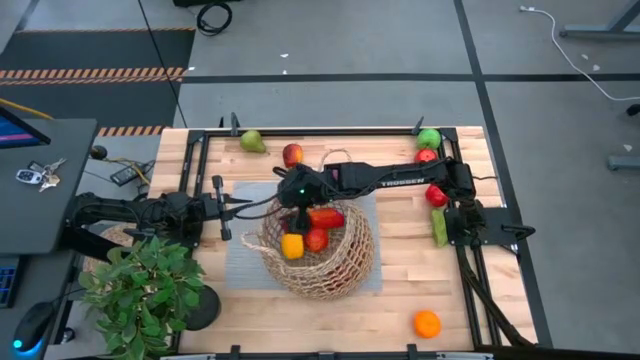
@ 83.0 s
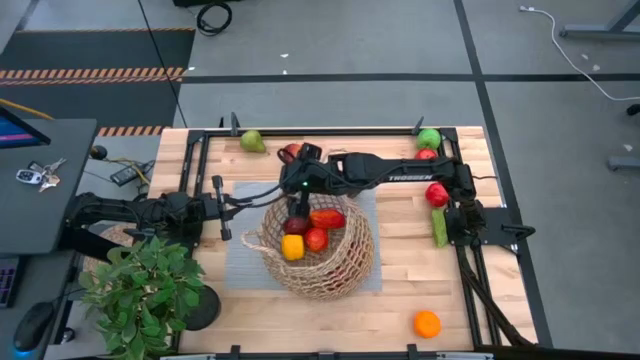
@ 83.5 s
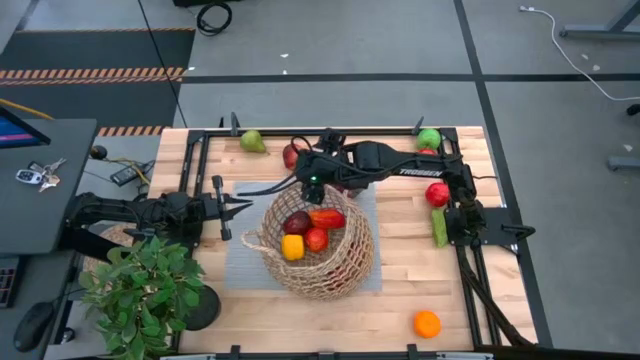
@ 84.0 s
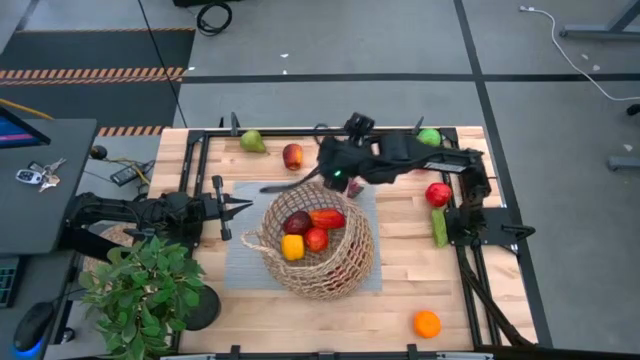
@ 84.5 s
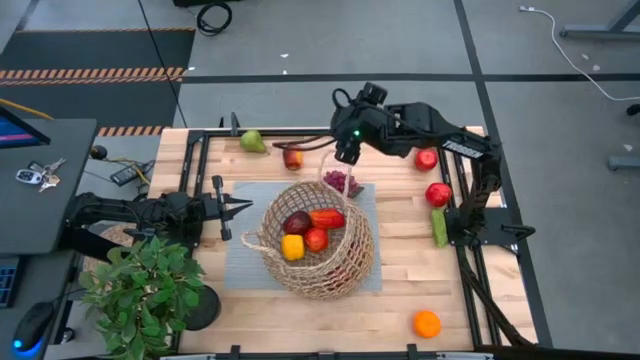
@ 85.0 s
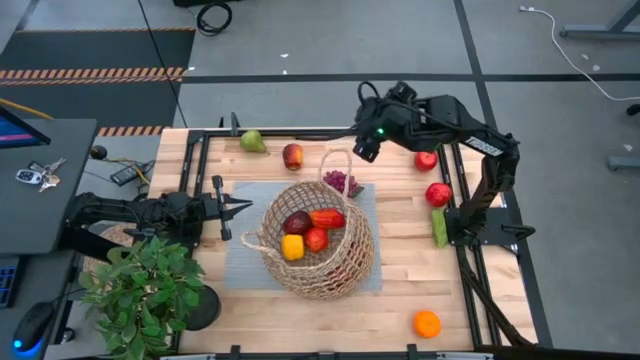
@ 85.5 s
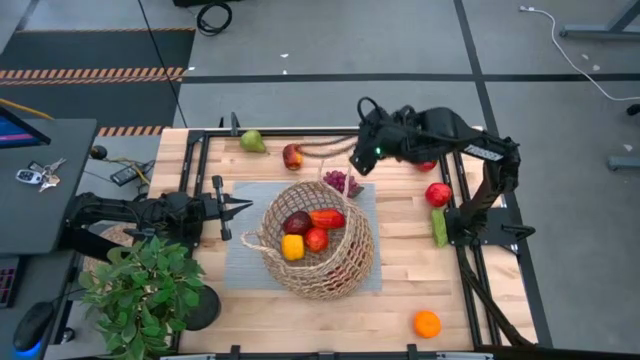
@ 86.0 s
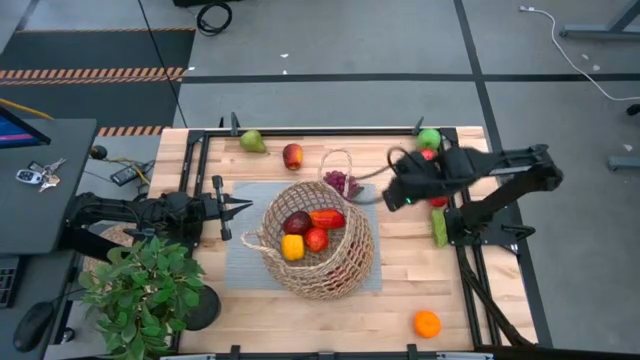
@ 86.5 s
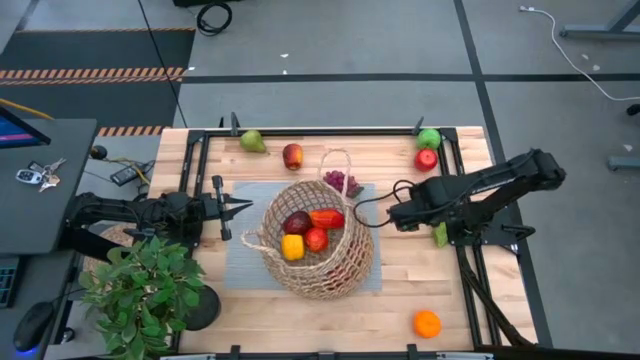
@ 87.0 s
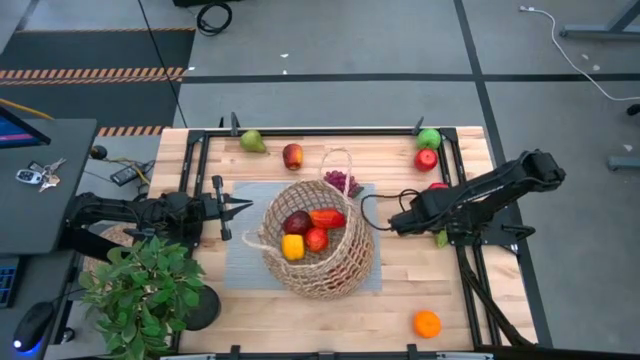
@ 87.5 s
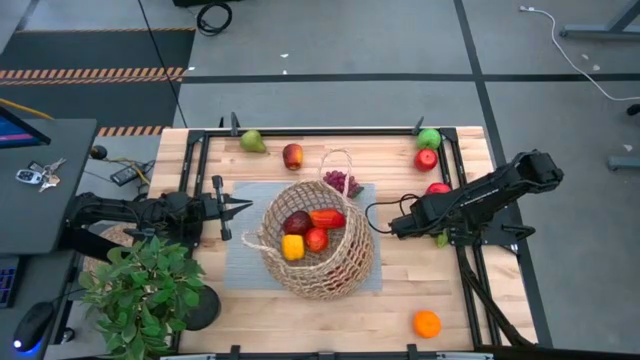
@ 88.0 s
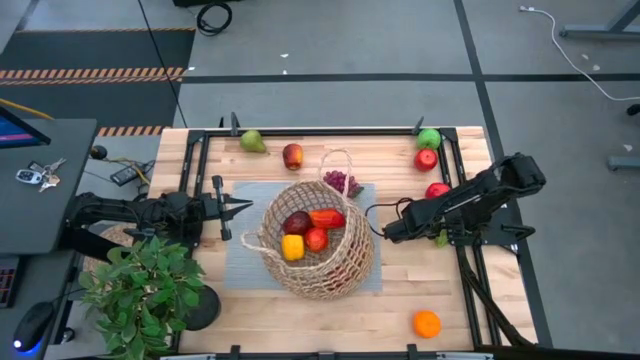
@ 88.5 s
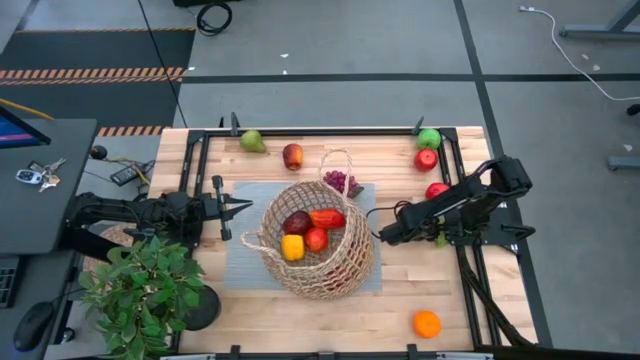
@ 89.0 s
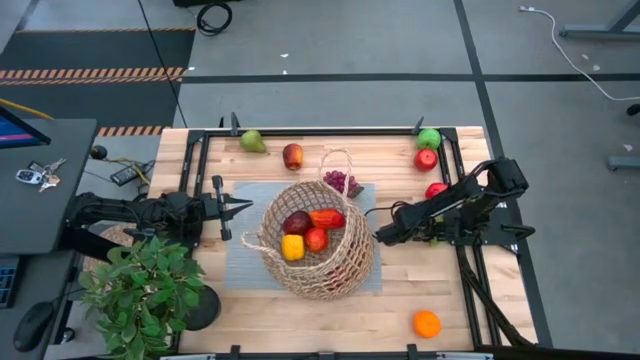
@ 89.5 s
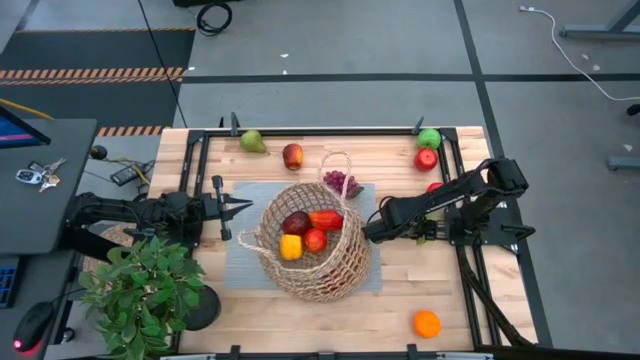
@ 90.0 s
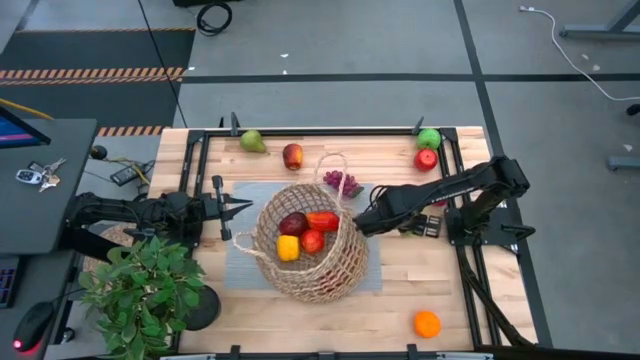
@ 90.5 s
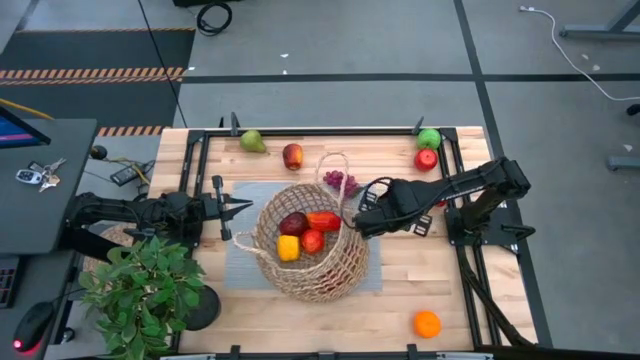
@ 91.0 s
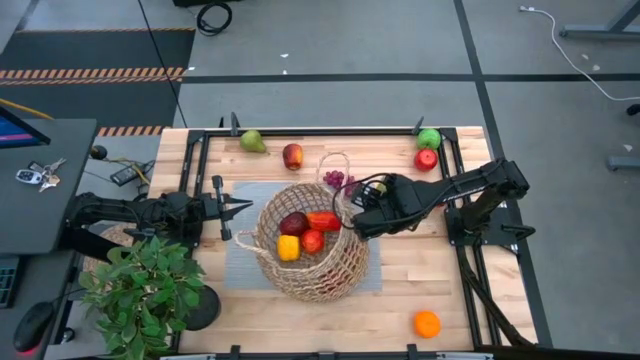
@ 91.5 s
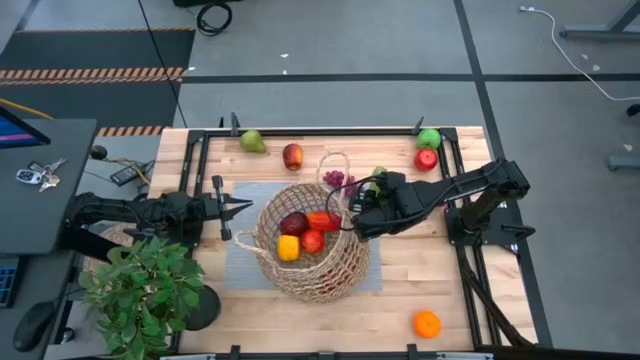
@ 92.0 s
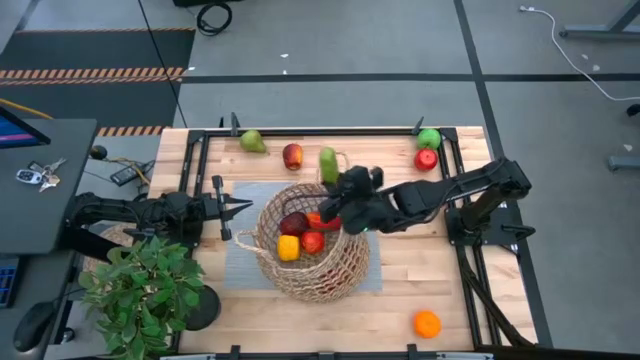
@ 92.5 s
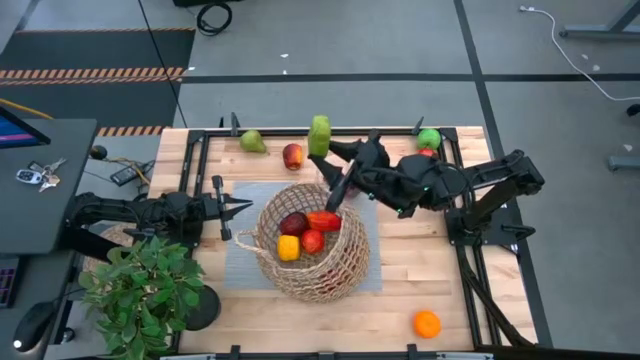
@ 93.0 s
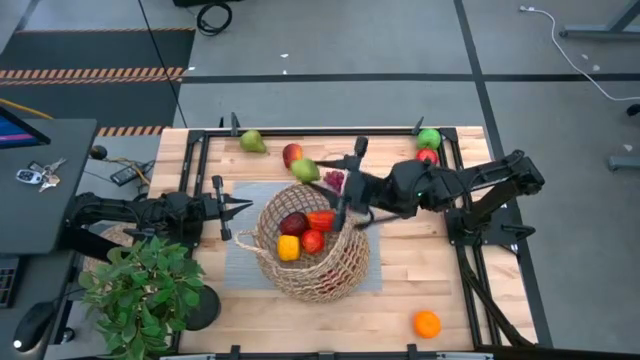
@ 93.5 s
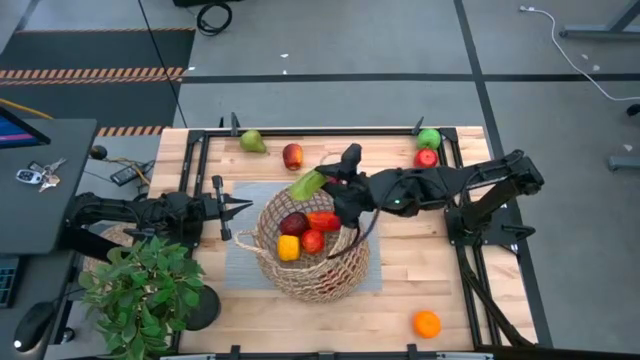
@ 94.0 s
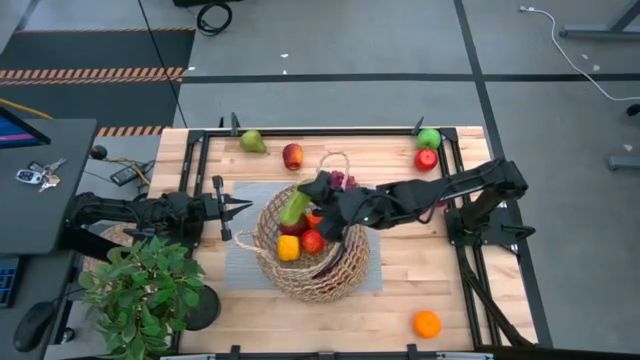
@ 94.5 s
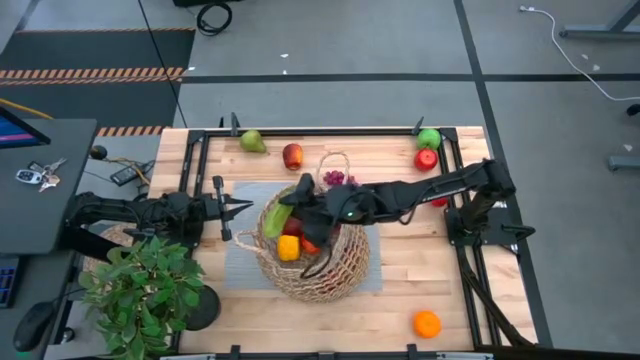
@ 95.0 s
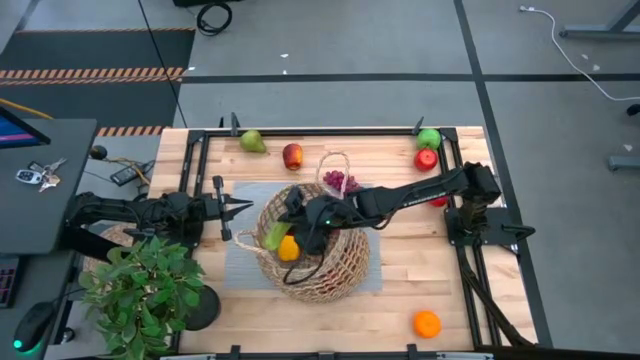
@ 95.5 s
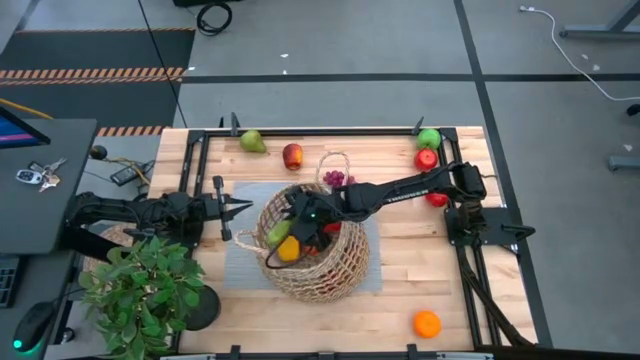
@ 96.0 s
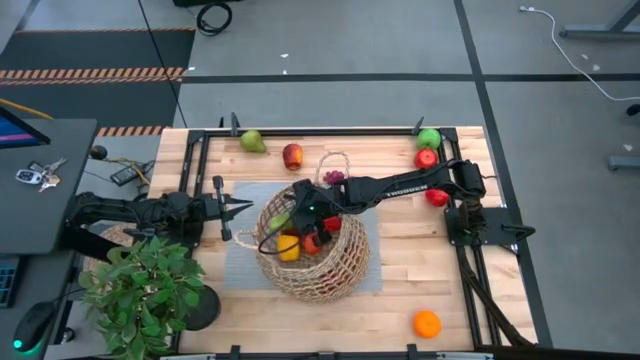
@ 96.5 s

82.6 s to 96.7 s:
Task: Build produce basket
Put the cucumber into the brown basket

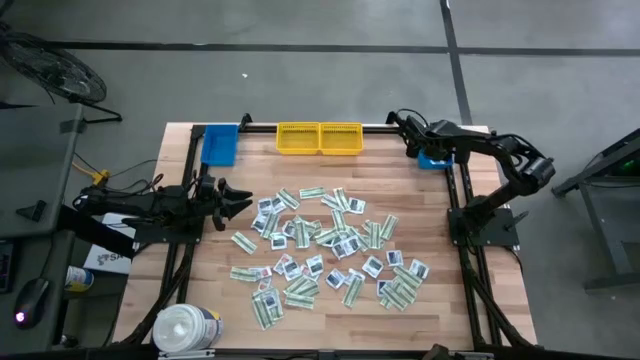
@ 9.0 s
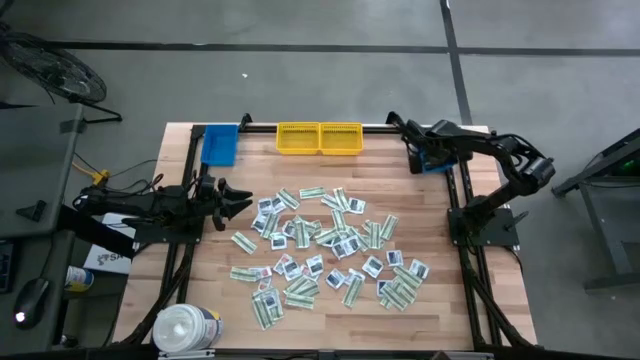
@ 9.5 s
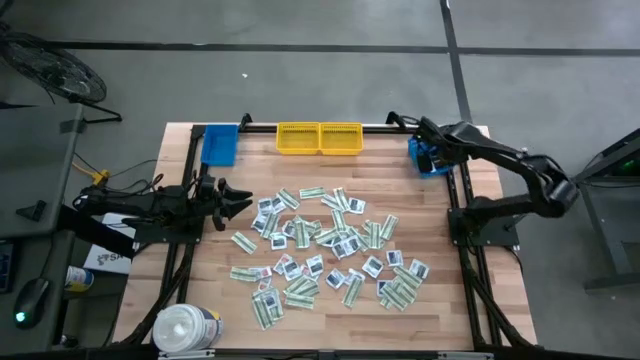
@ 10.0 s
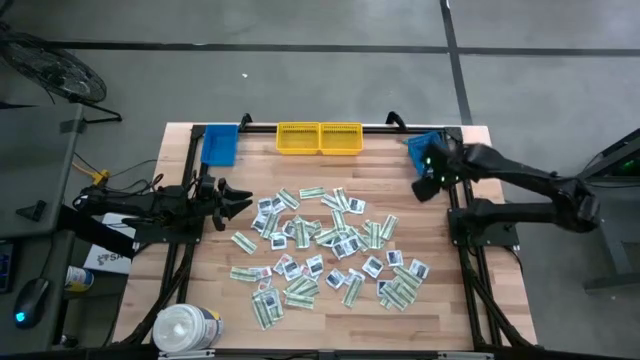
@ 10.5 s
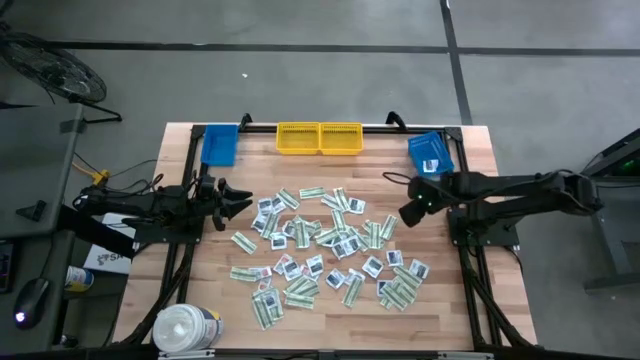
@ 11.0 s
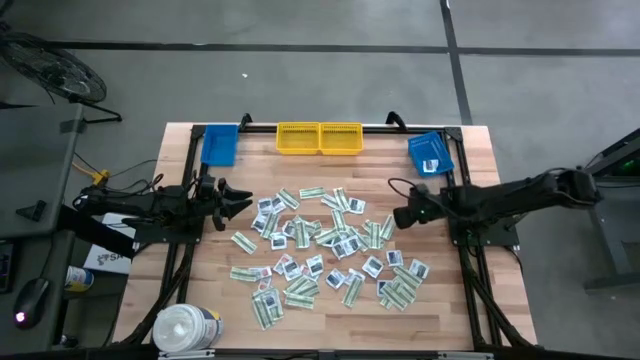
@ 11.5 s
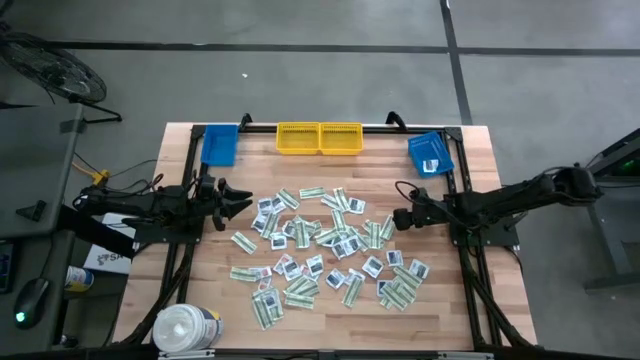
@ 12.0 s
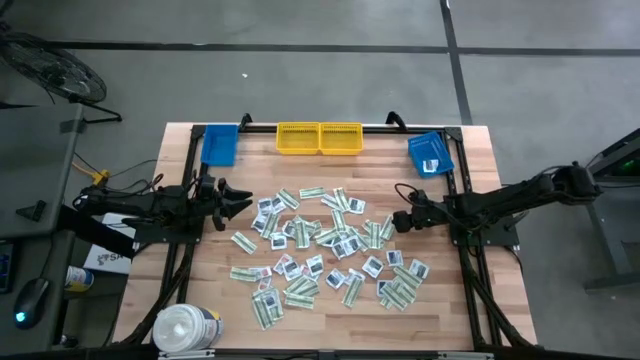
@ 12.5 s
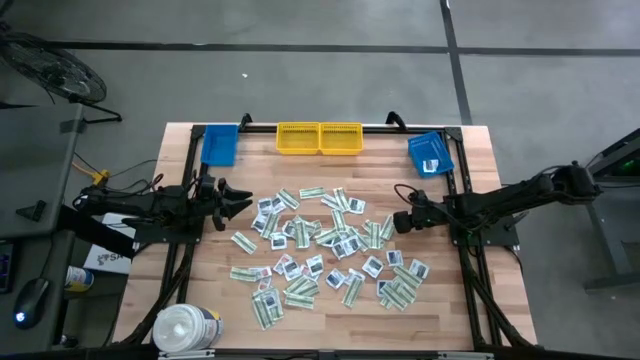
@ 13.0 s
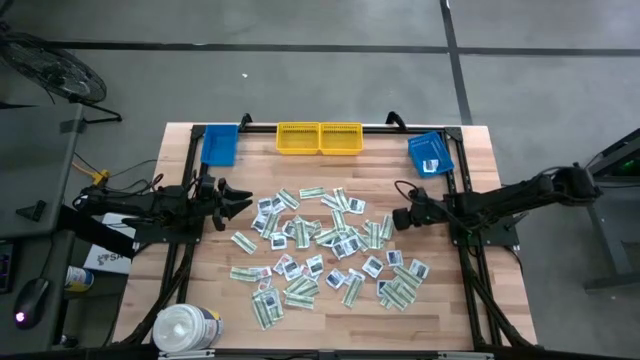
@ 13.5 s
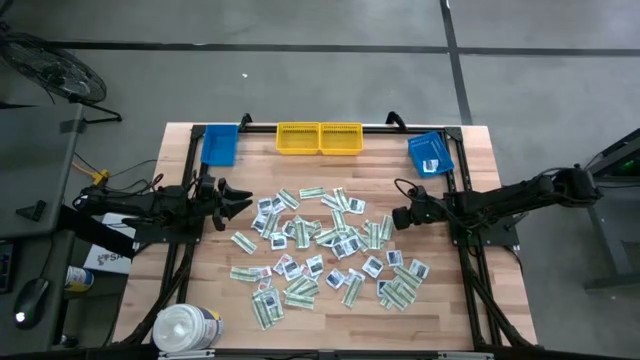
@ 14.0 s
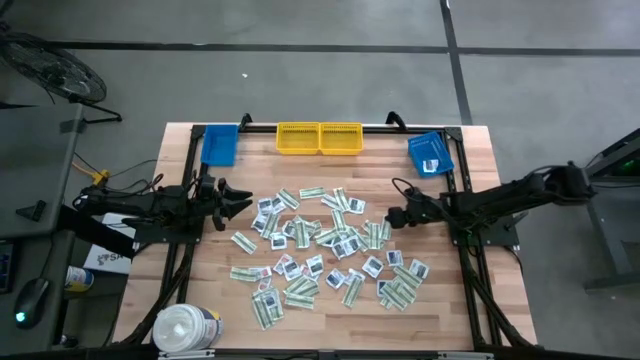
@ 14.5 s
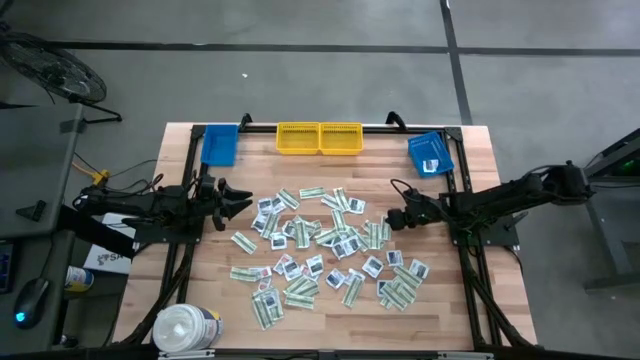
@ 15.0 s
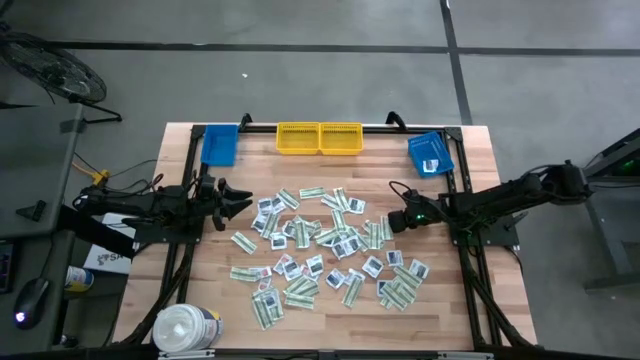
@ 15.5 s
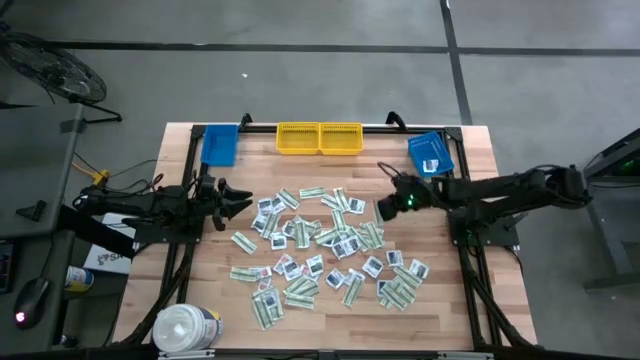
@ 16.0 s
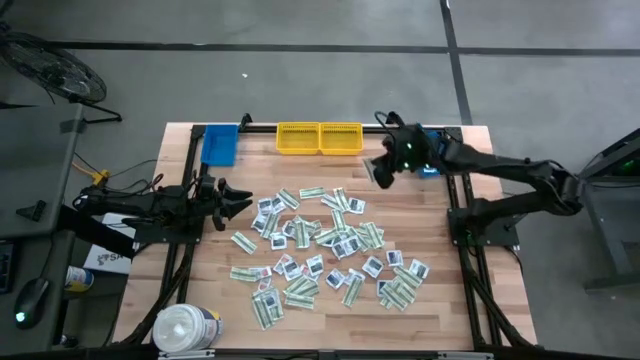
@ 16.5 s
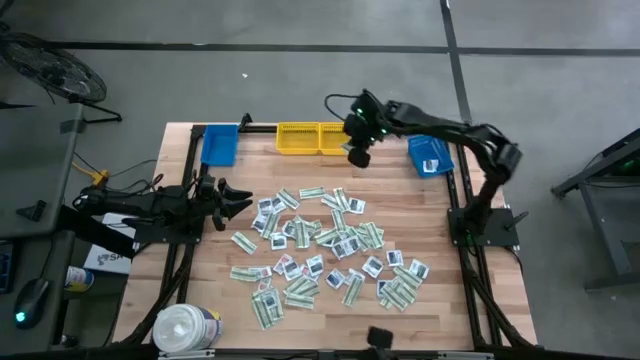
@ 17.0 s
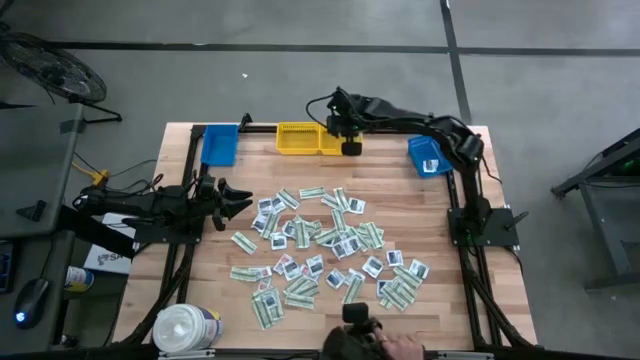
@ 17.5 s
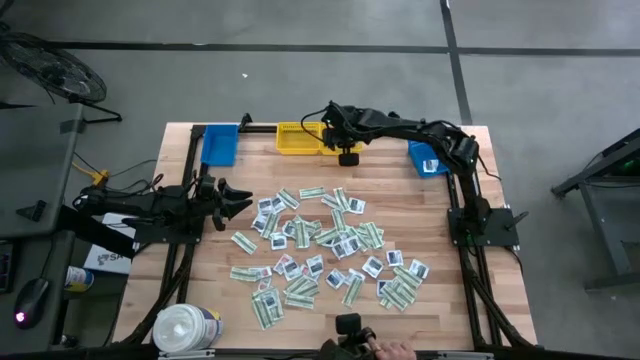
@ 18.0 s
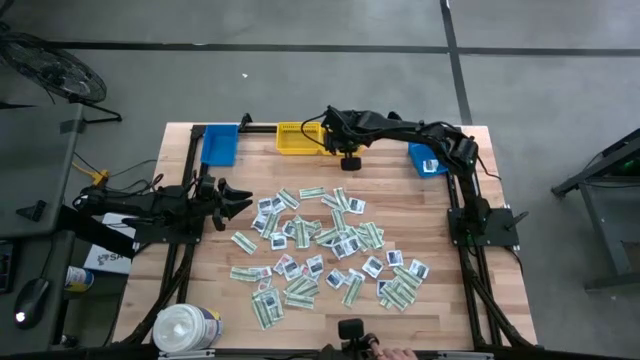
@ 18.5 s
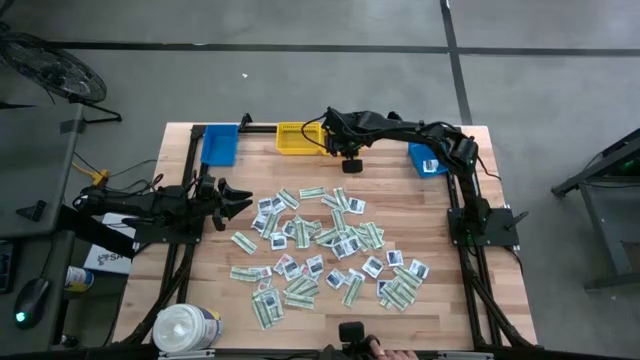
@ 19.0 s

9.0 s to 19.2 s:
Task: Pick & Place First Aid Supplies
Put the green bandage pack into the right yellow bin
